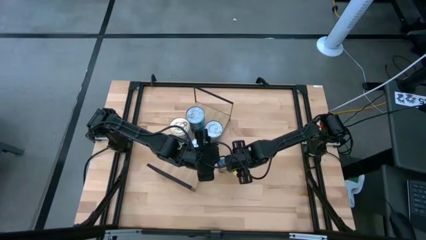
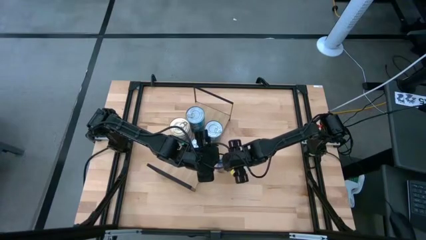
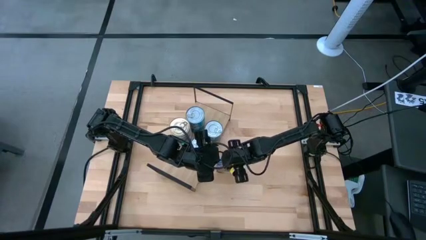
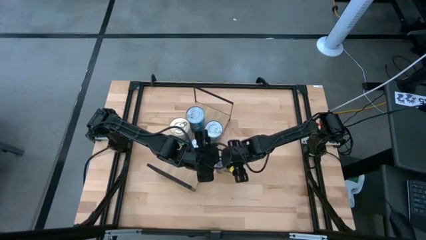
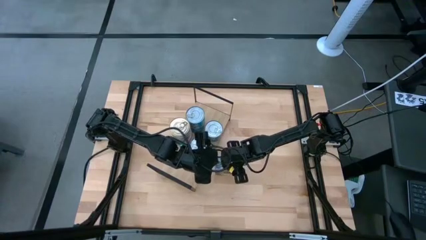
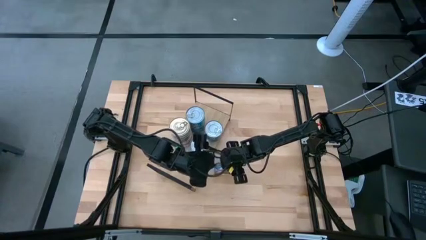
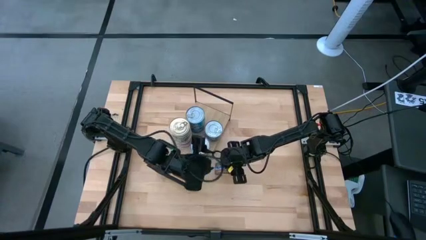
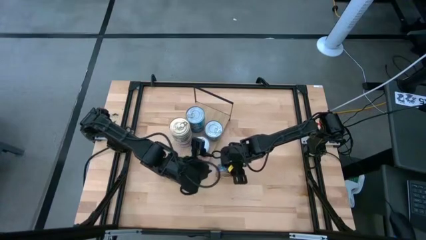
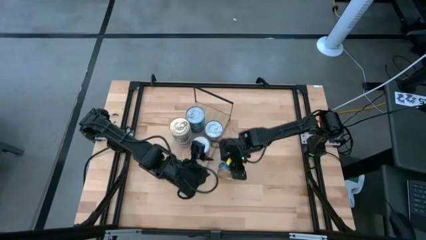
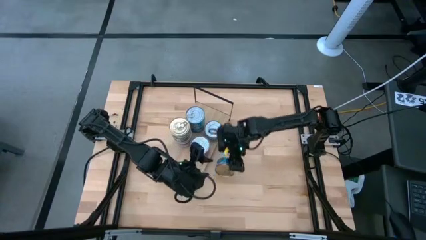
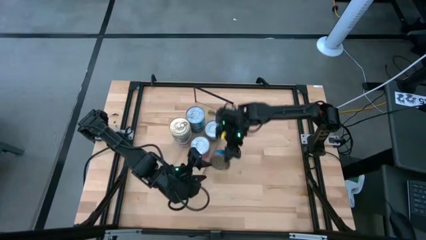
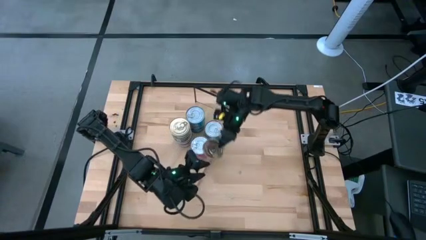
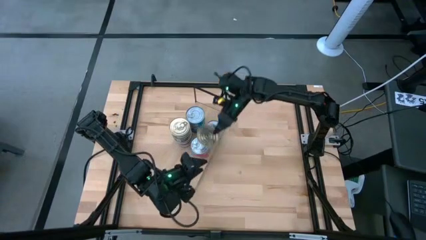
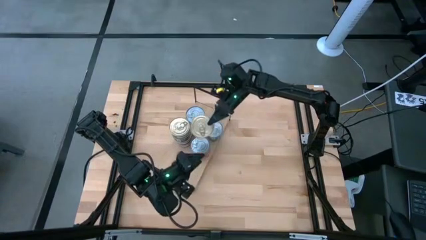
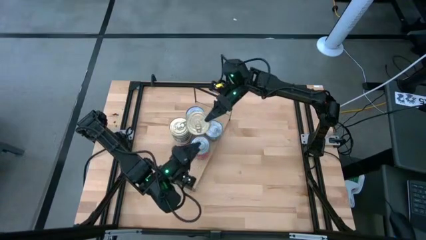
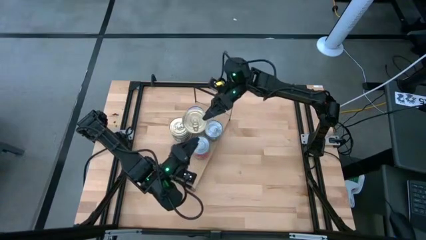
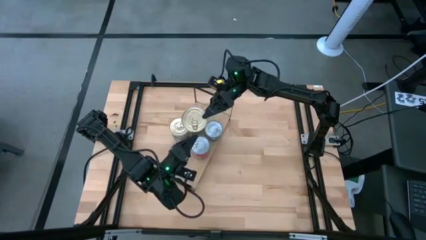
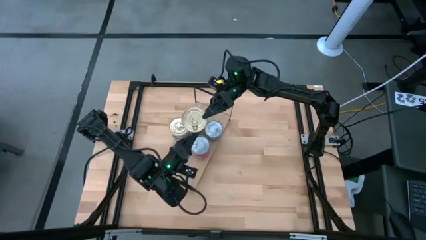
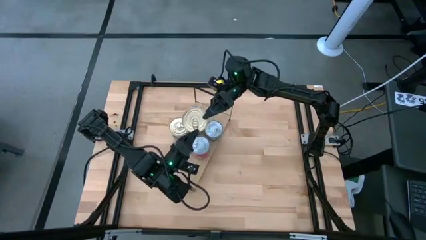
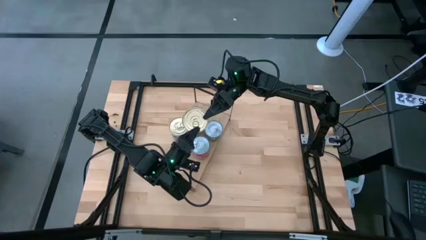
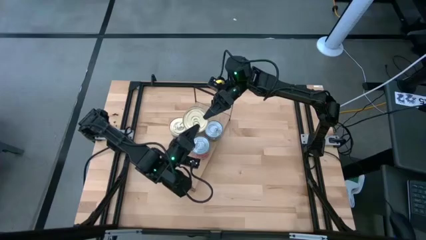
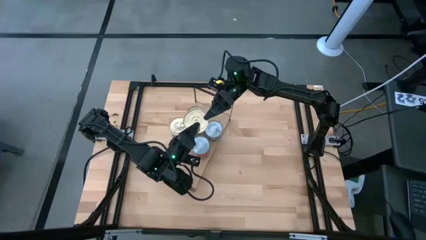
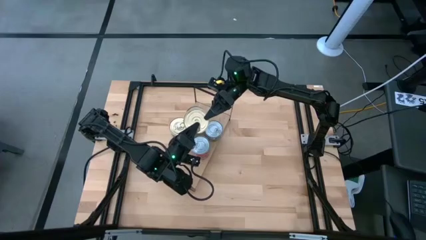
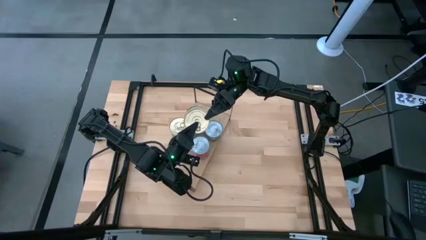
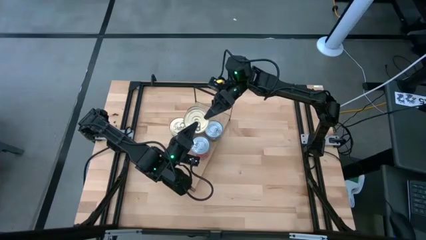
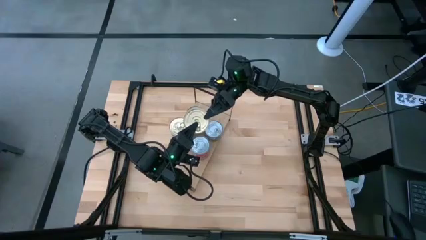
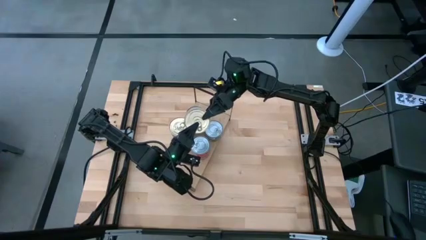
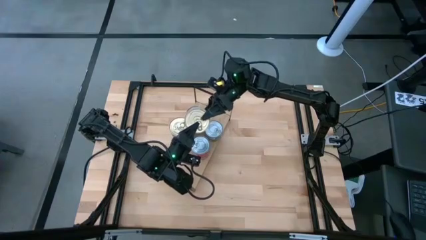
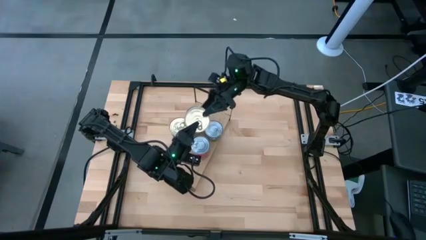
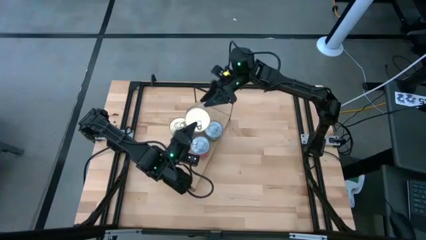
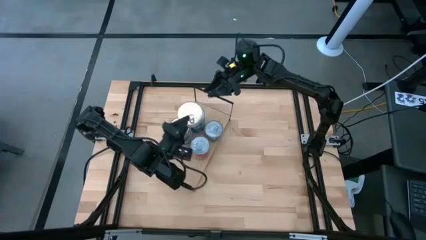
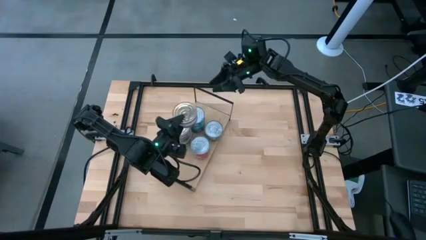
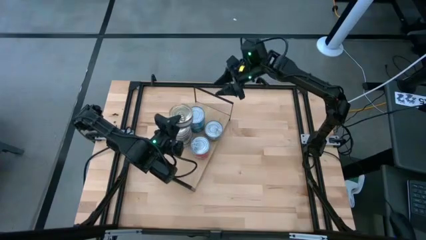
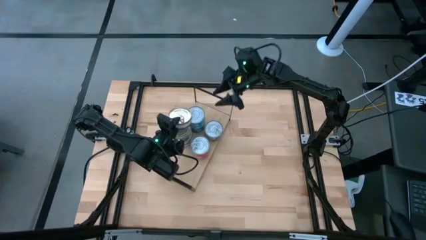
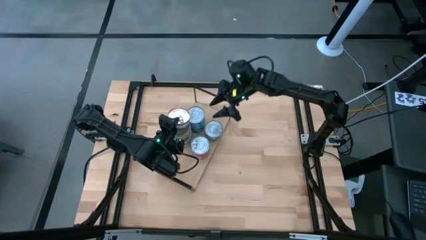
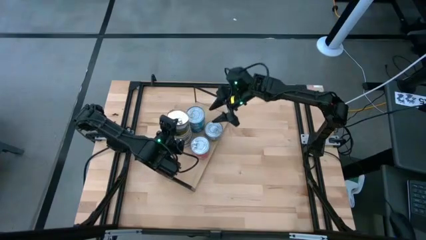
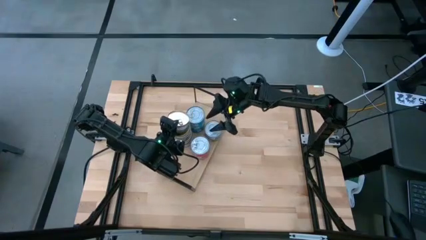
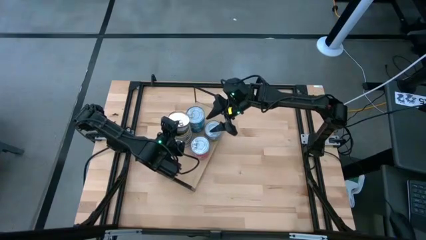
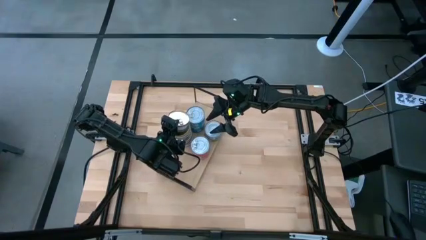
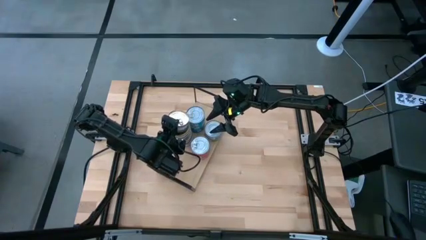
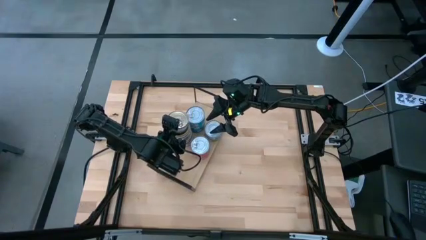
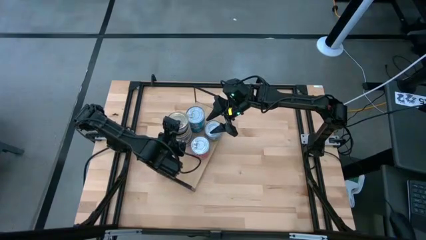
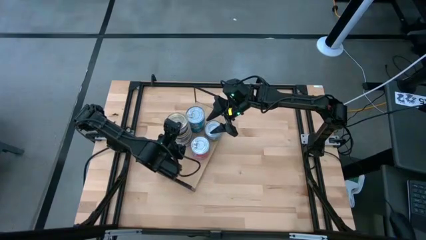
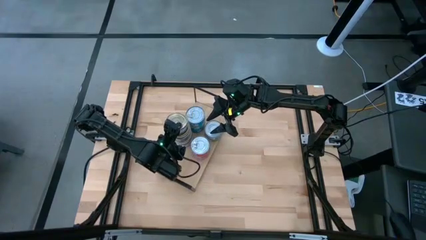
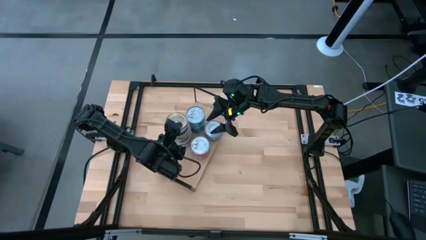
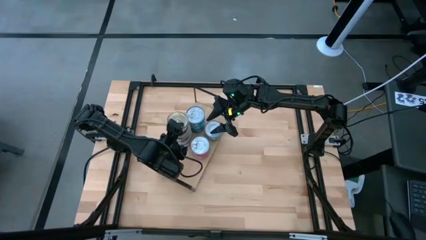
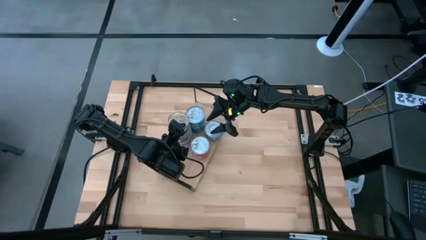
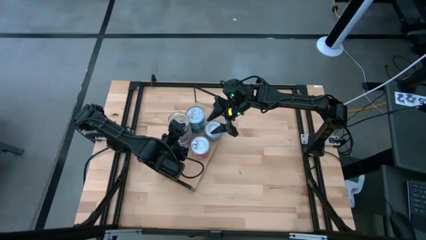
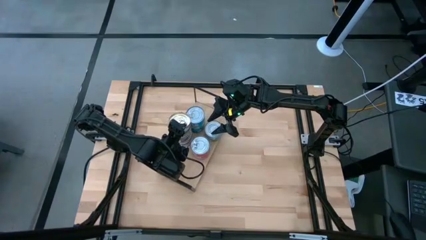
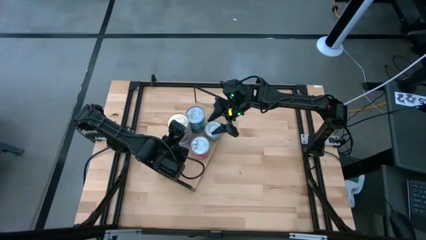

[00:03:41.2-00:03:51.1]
Task: Stack canned seafood by type on shelf
Stack the blue tuna can on top of the blue tuna can on the shelf

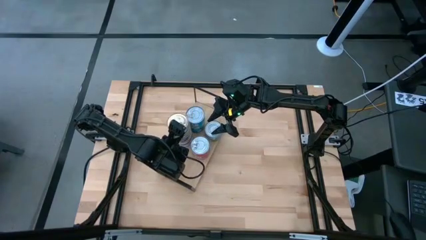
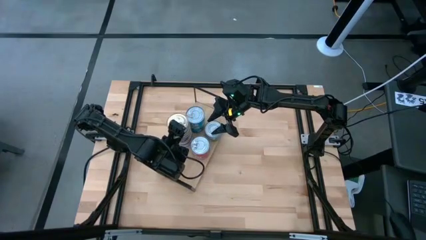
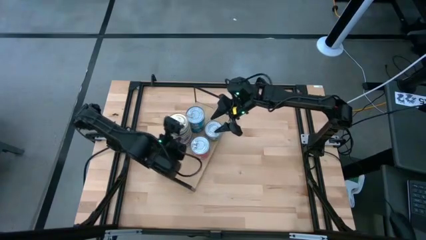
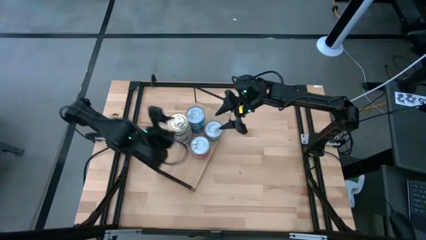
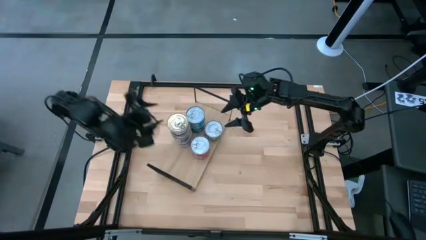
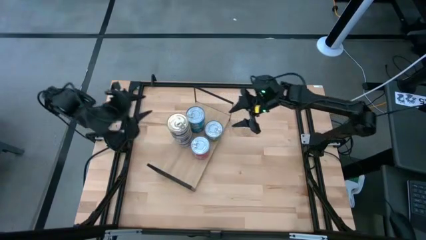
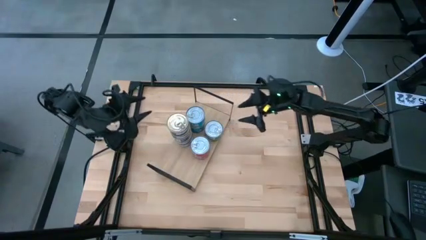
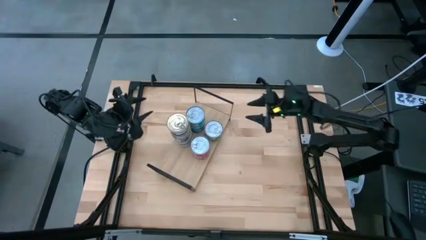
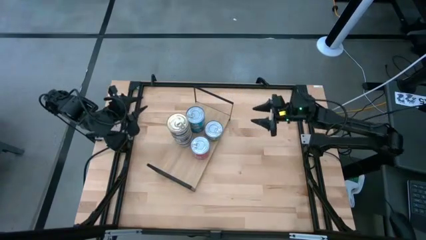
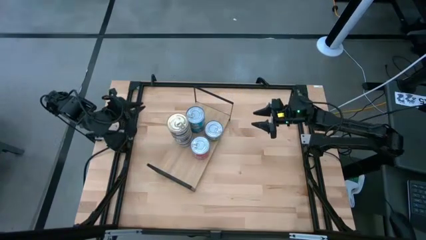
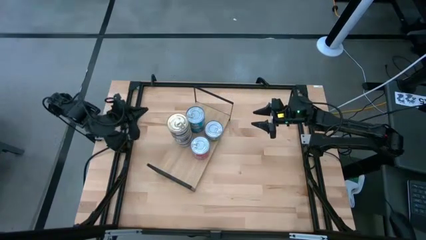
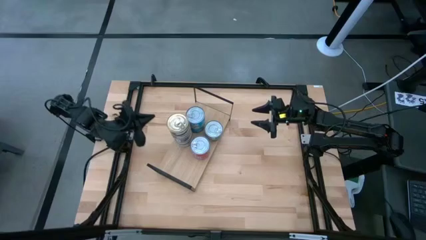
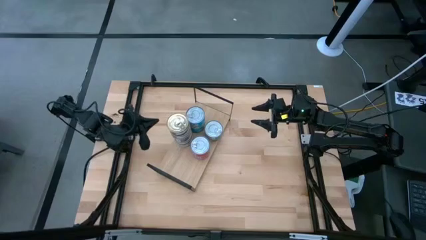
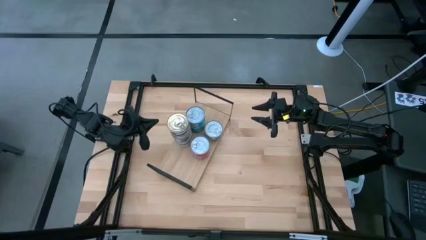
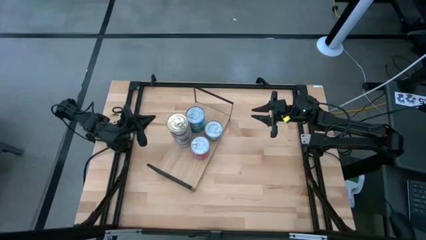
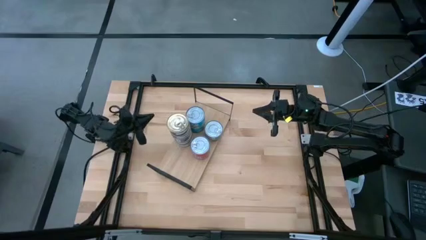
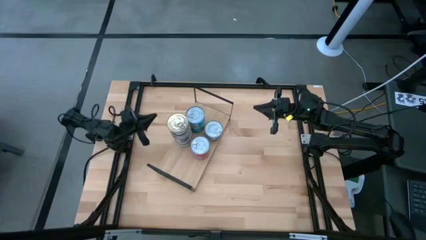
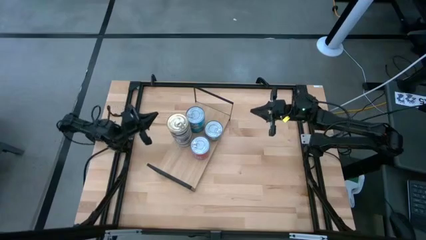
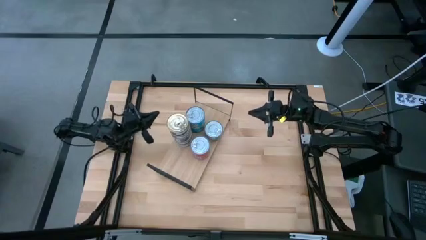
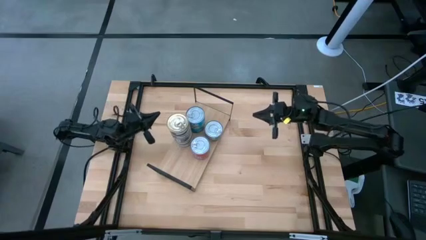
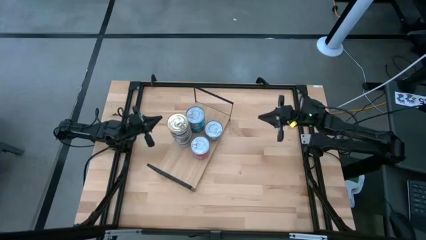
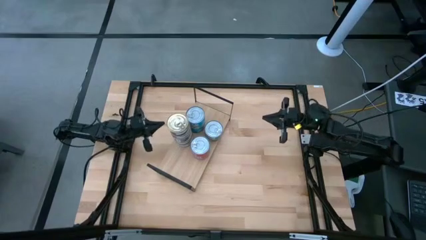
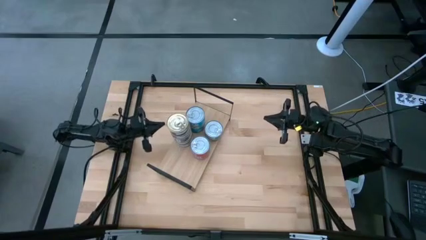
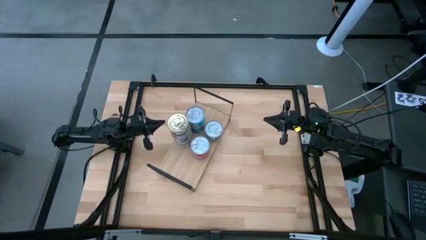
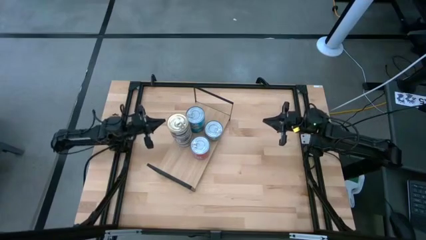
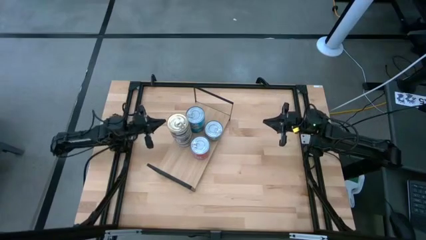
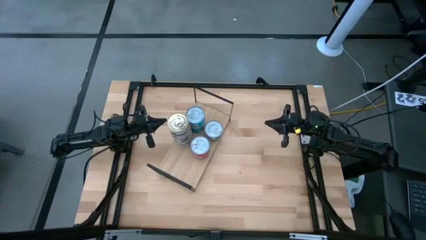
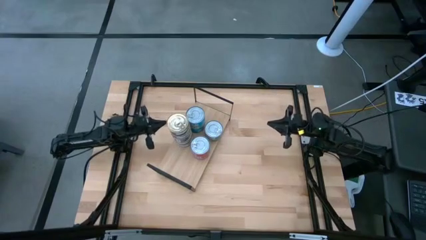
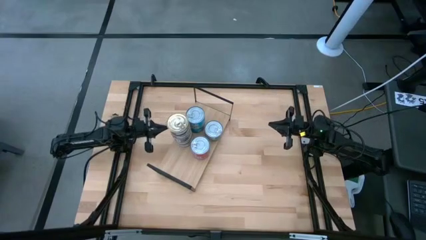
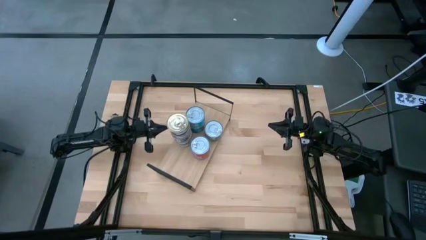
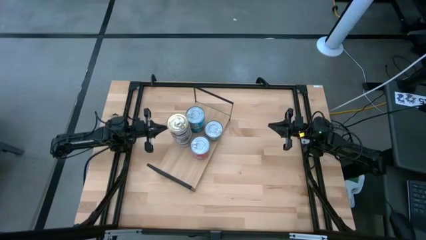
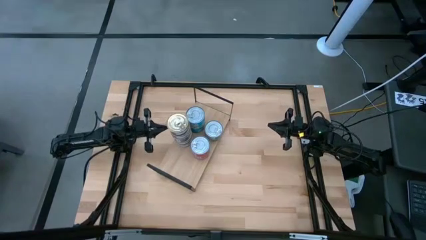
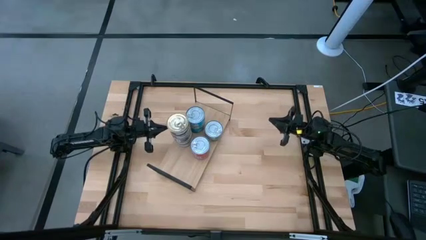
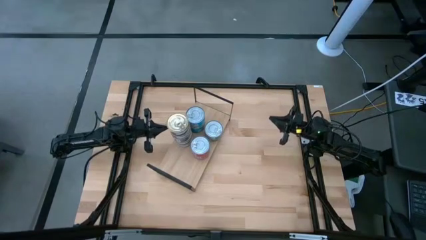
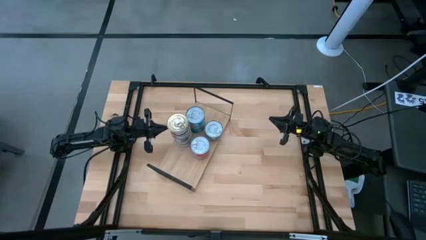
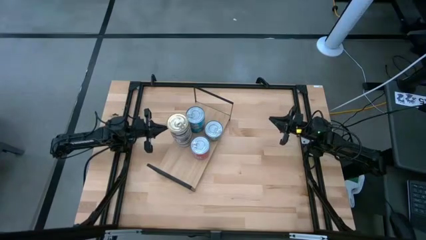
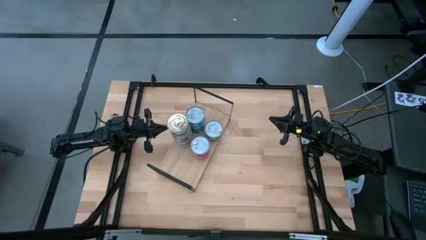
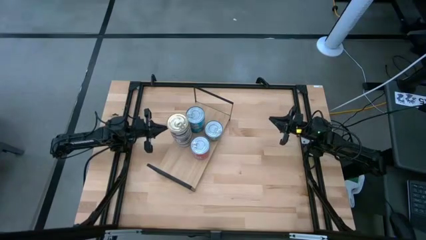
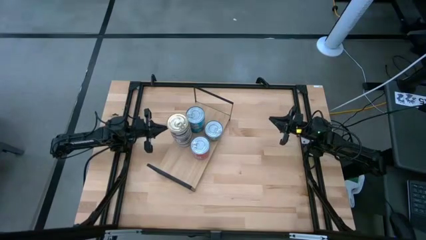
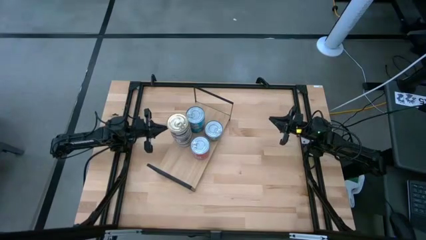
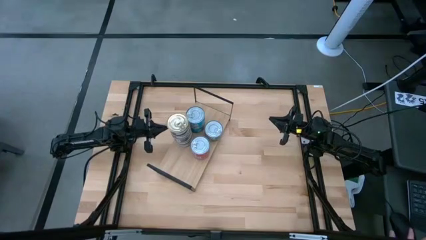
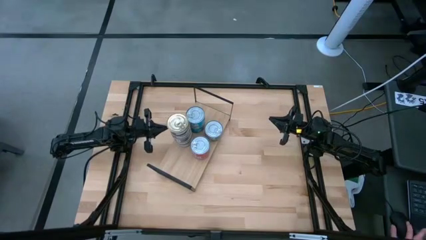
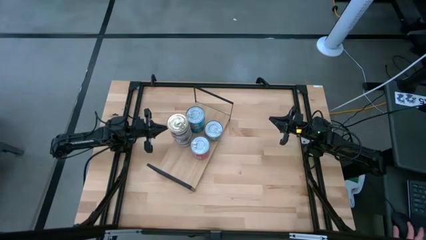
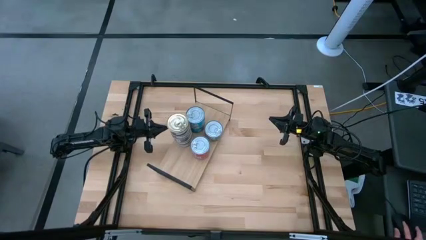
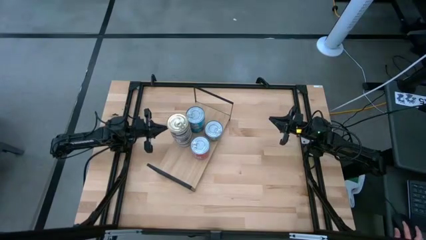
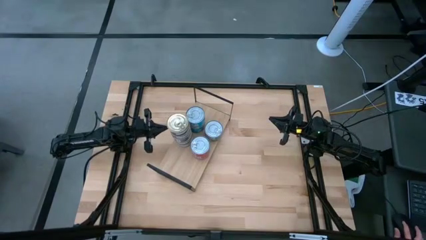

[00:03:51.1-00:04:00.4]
Return to Home Position
